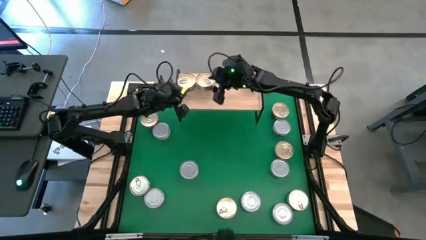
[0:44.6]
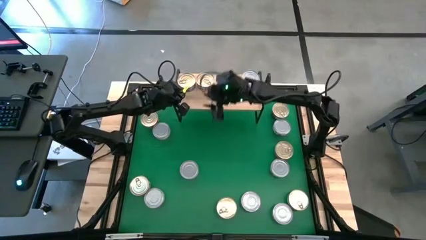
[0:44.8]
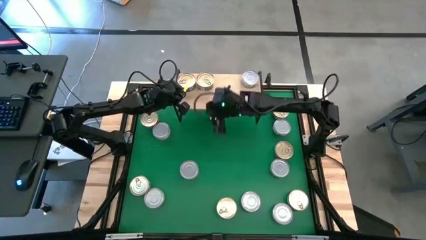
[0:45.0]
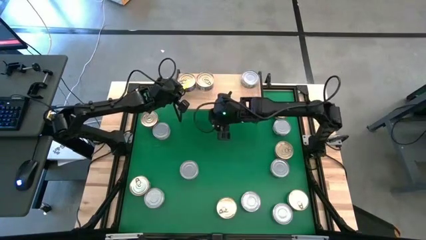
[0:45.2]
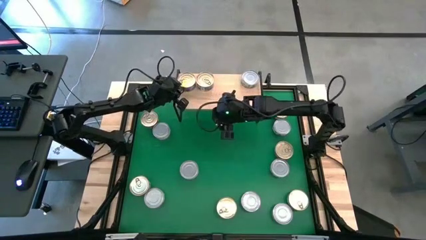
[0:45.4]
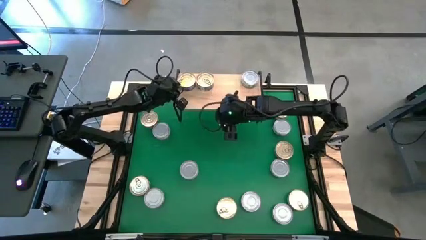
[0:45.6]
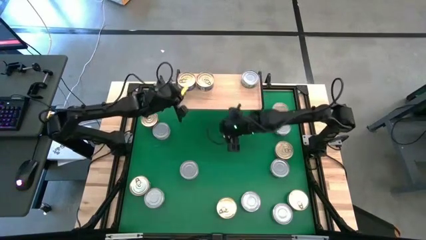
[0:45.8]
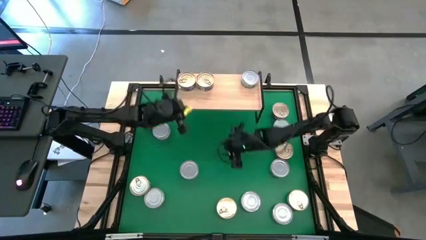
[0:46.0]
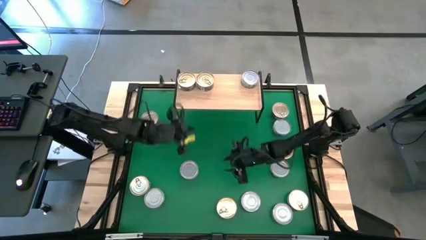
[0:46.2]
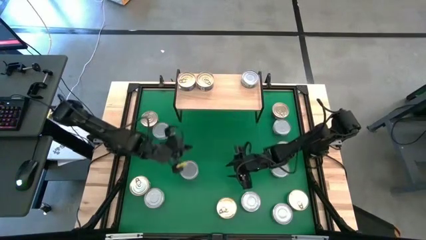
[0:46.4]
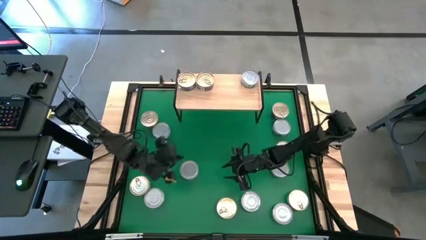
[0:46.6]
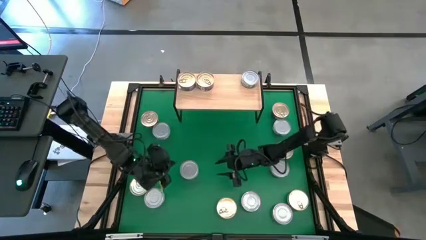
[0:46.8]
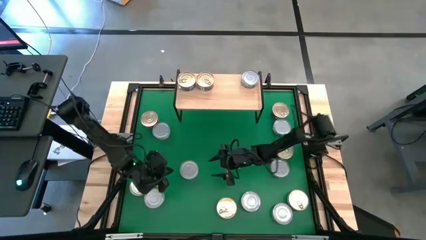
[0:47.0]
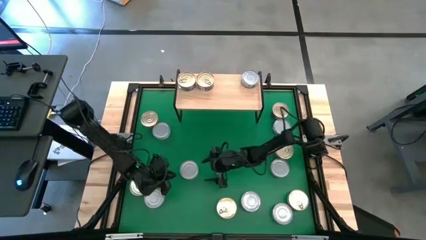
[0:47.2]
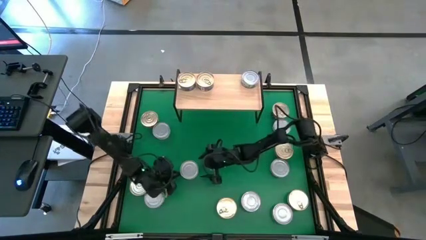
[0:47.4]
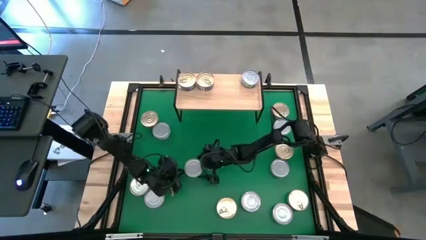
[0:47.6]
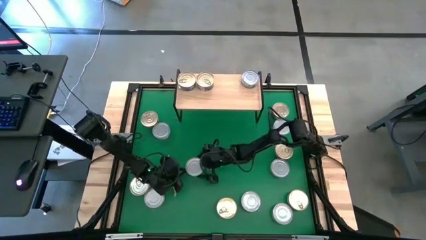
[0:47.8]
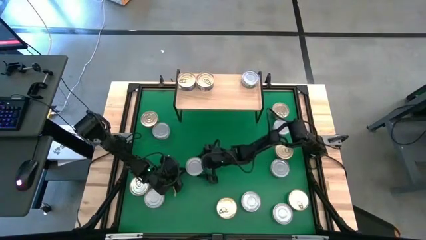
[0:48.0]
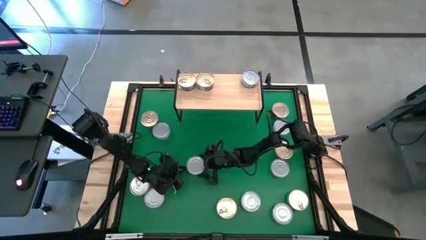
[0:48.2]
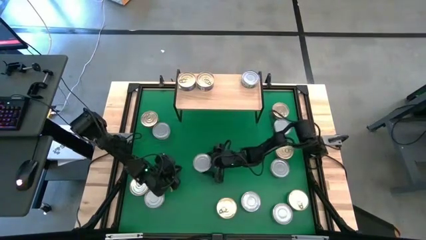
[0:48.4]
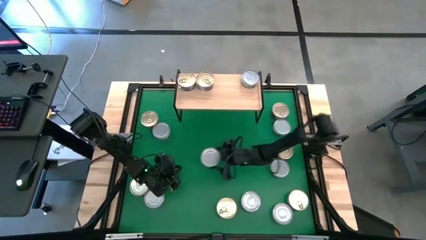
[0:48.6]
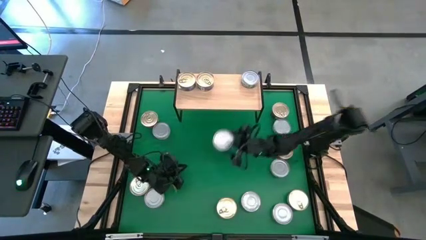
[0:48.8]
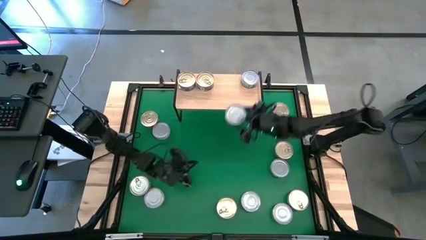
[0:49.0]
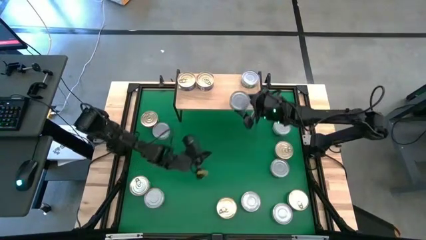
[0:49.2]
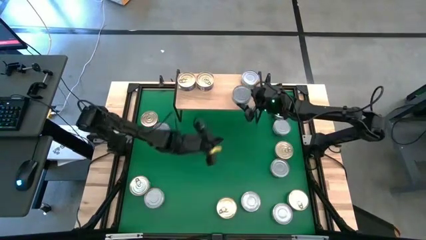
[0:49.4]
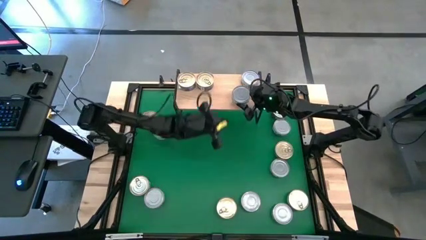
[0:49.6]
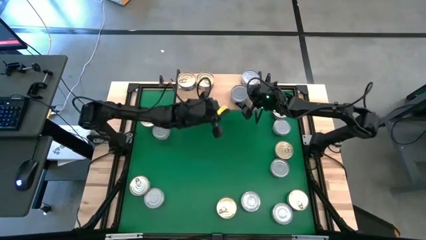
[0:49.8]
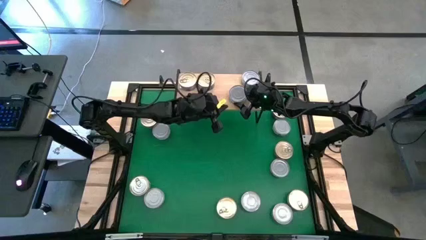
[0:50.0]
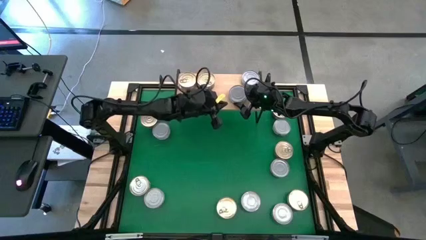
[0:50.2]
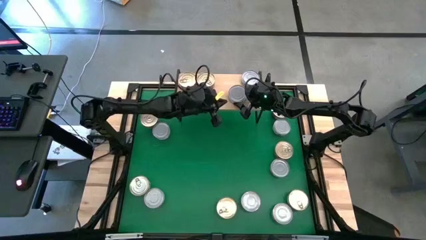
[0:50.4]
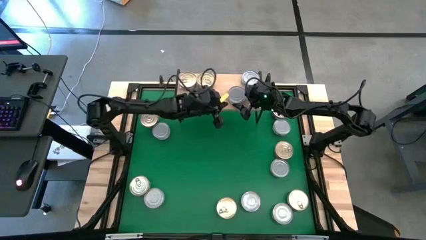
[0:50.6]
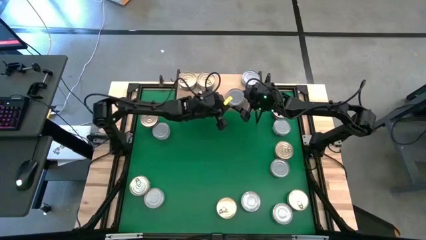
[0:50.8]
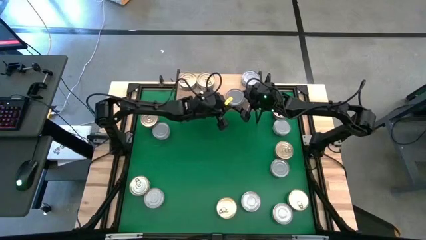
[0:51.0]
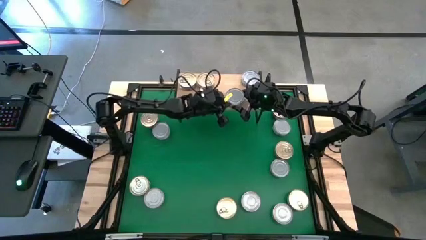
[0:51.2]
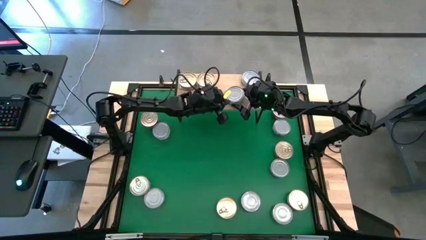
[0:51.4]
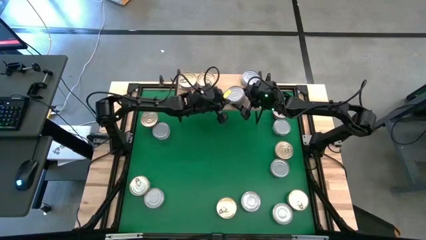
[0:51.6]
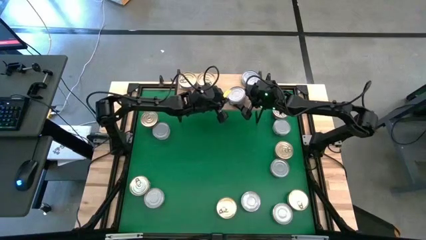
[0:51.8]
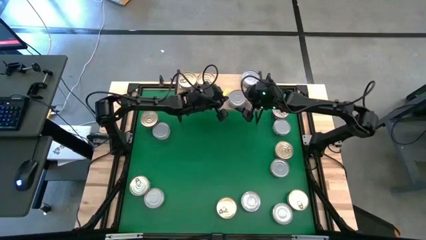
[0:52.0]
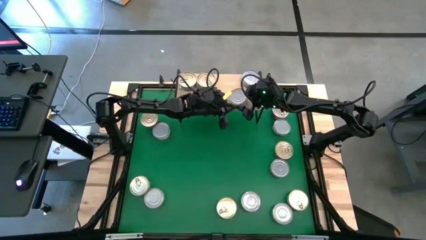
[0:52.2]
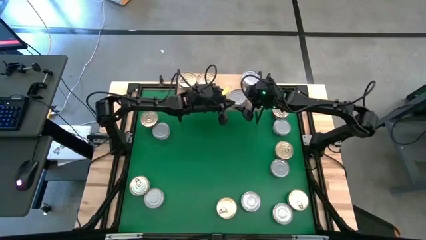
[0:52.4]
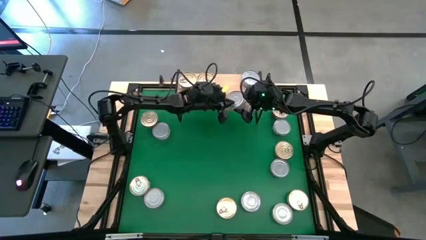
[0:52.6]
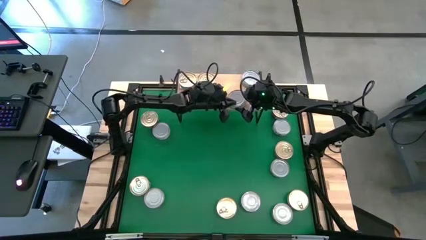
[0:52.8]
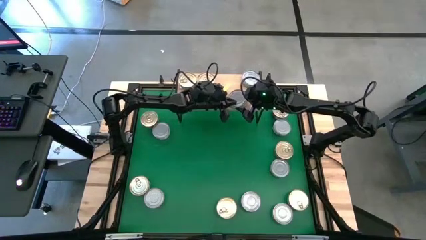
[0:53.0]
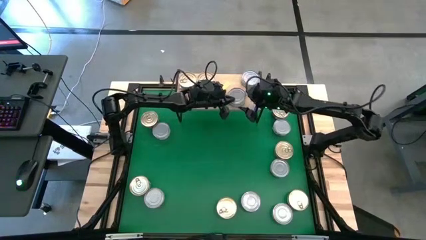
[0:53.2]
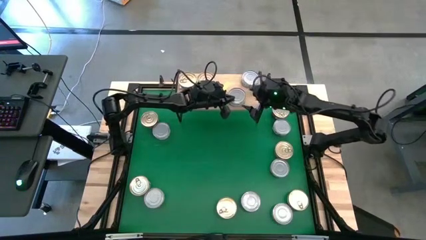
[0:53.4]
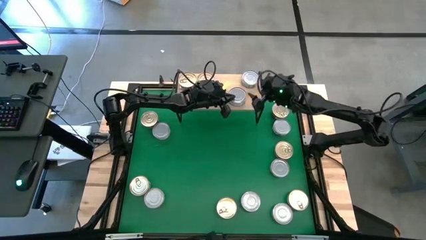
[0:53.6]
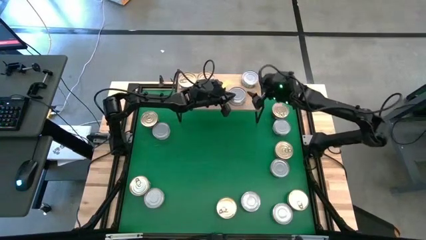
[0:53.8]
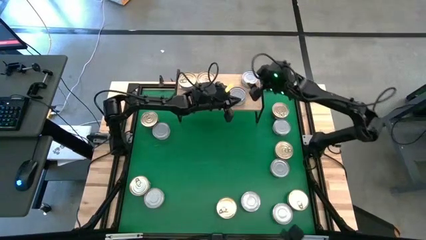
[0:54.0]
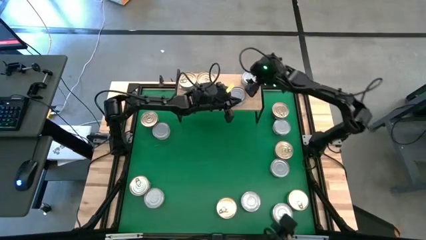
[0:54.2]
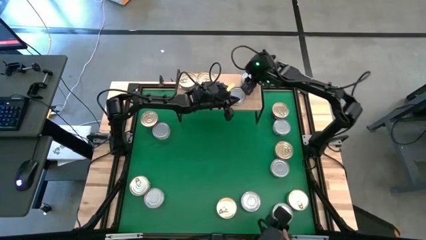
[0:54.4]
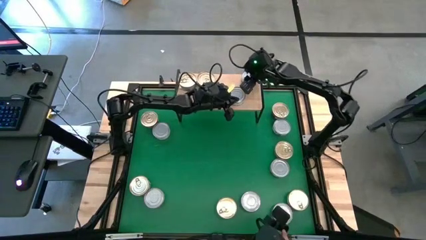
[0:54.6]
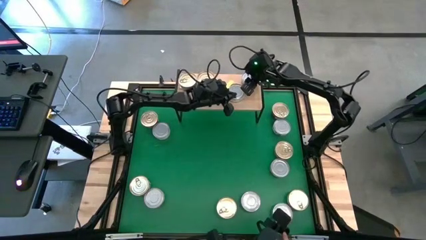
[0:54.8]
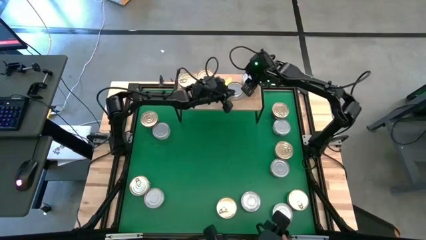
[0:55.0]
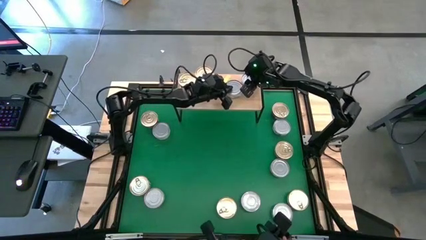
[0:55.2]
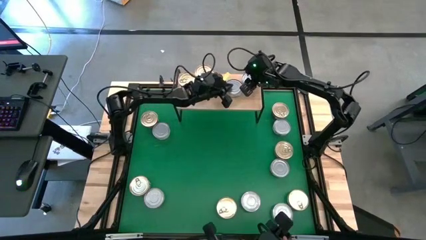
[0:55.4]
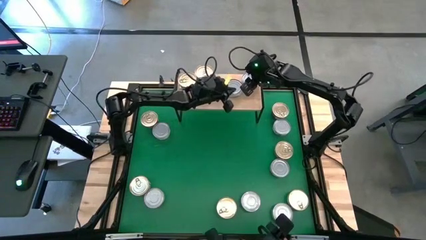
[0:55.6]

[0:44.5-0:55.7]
Task: Stack canned seafood by type on shelf
Put the green tuna can on the shelf aligned with the other green tuna can

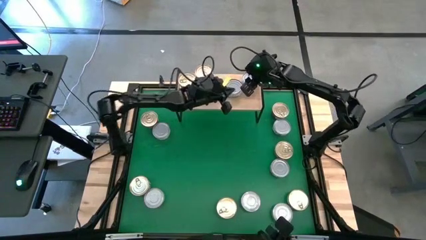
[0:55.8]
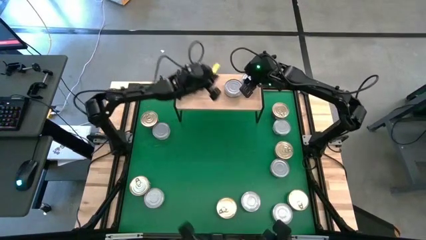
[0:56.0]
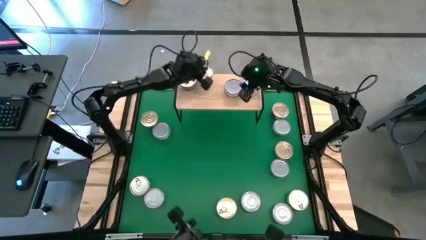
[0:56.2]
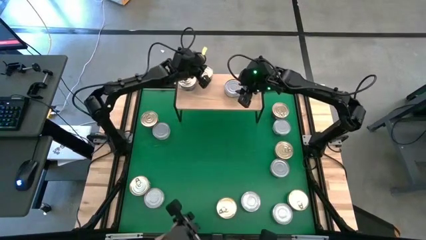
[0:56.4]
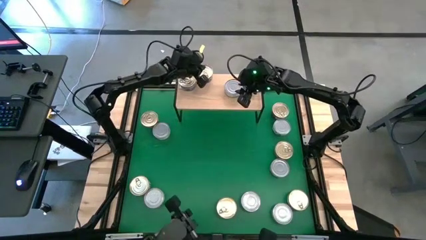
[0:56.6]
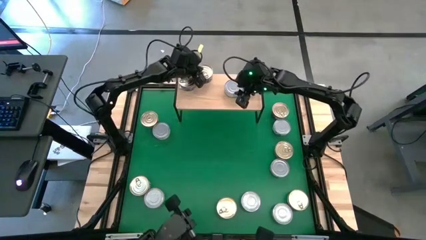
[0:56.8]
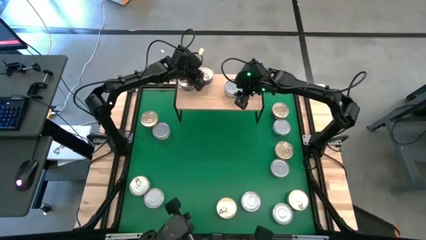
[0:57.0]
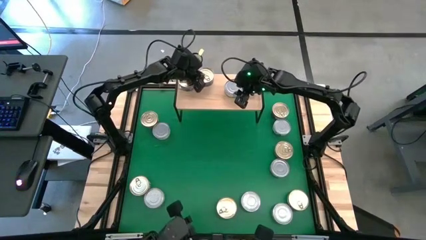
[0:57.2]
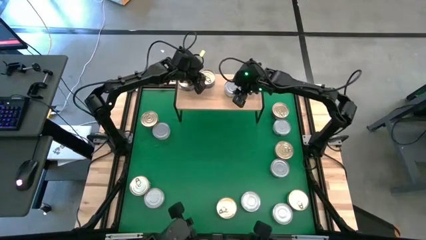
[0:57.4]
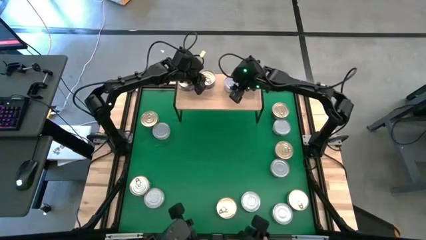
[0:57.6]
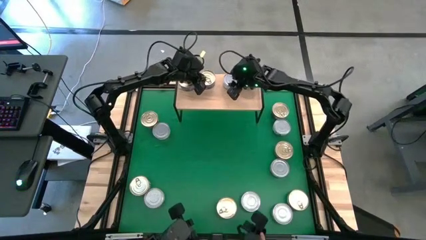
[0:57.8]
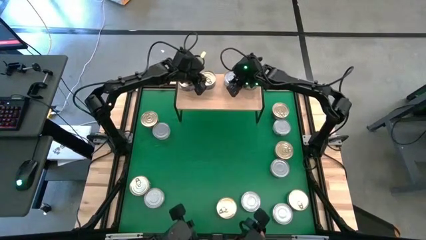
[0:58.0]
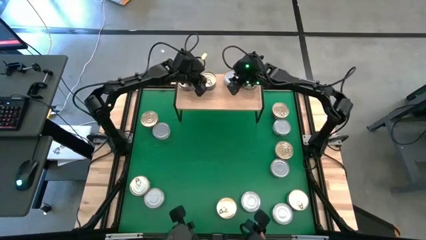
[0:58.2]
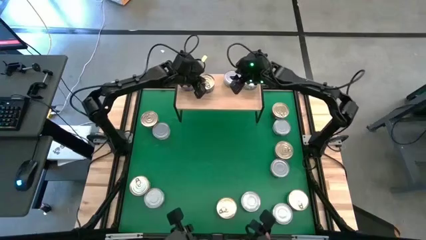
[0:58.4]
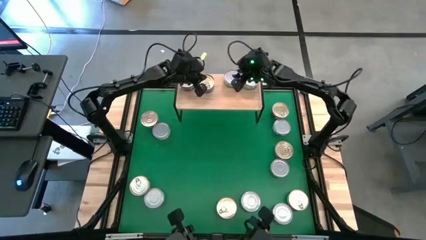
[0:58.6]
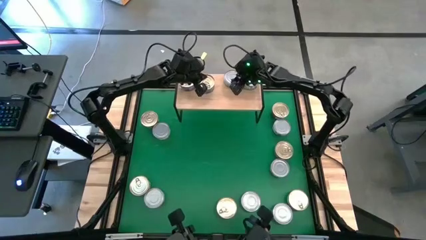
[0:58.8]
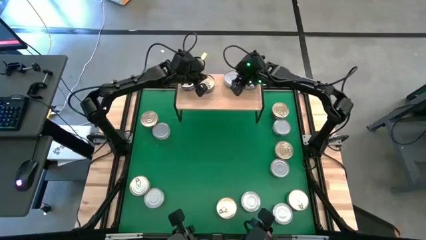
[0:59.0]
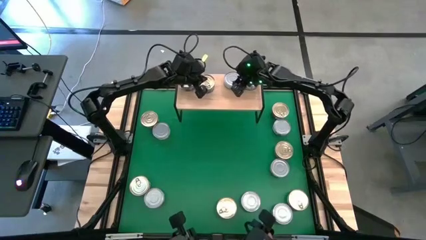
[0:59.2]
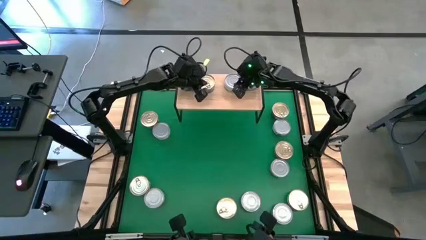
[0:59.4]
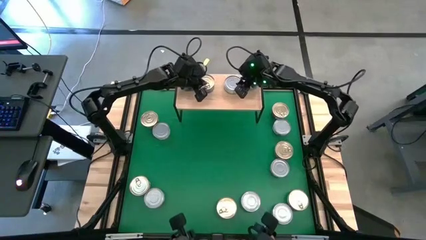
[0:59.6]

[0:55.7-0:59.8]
Adjust the tuna cans on the shelf

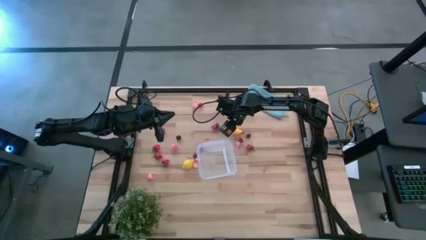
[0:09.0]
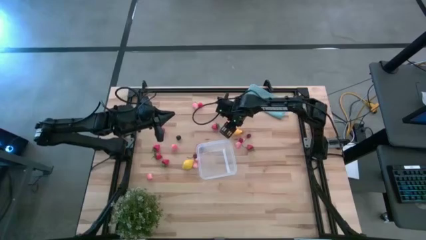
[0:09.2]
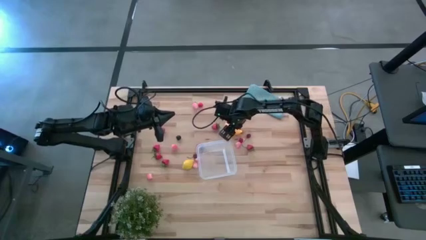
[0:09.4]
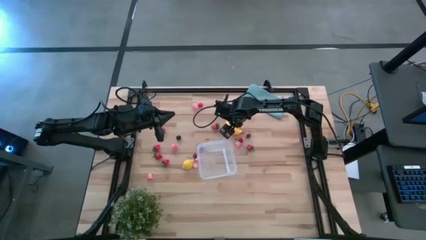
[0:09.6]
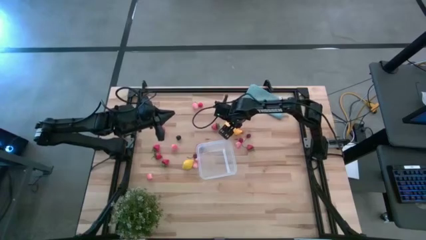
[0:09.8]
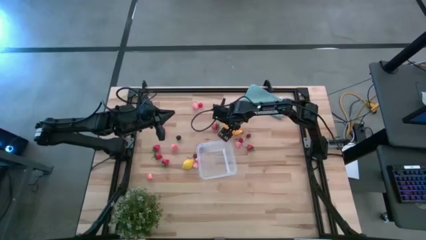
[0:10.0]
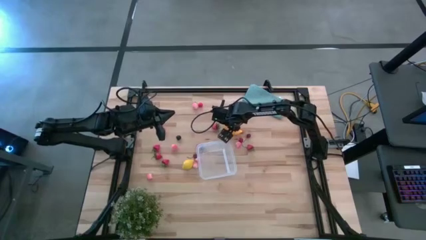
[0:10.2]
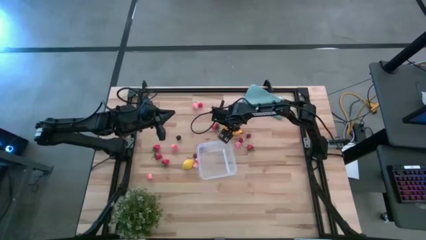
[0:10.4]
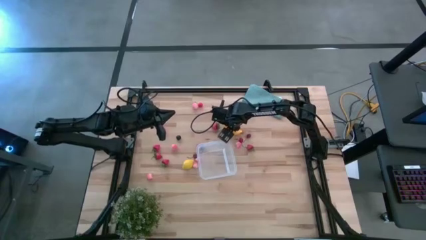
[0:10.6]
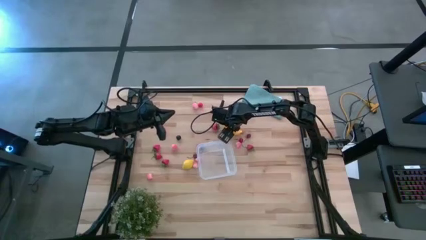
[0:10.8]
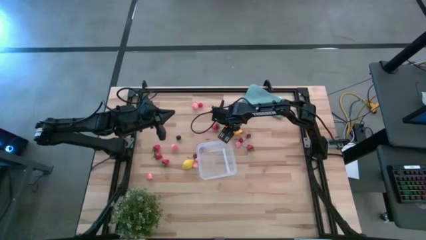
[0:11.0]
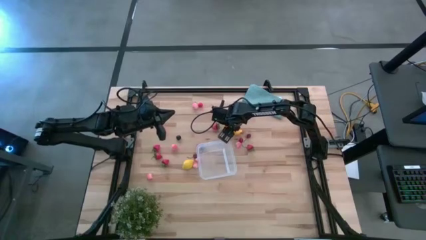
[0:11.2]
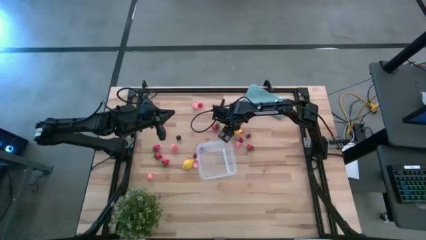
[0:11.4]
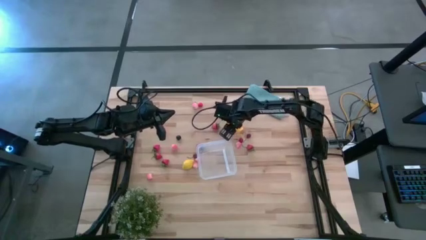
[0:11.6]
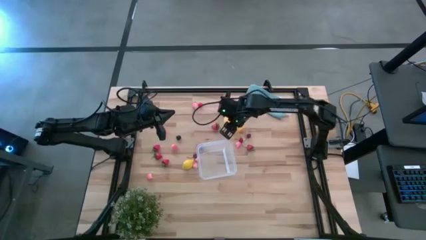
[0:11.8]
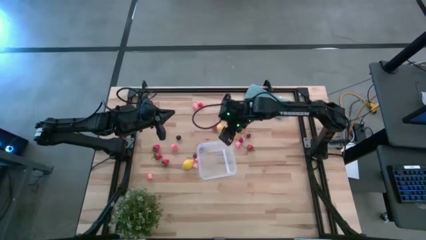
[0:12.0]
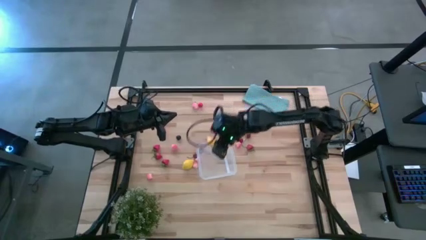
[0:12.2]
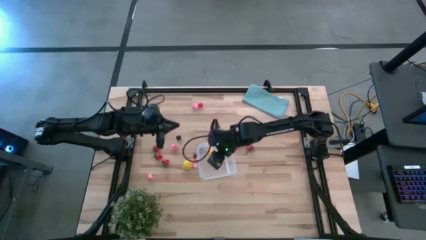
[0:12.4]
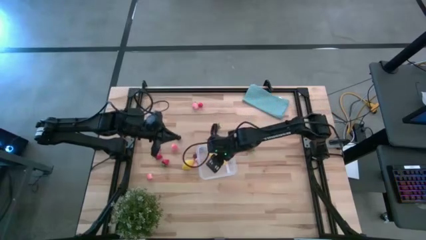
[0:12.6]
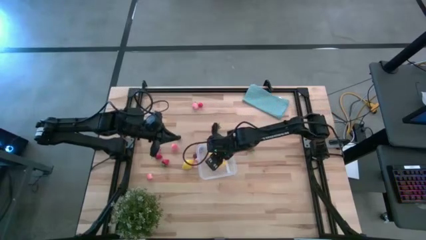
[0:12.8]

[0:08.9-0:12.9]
Task: Pick and placing Produce into tupperware
Put the yellow banana into the transparent bin
